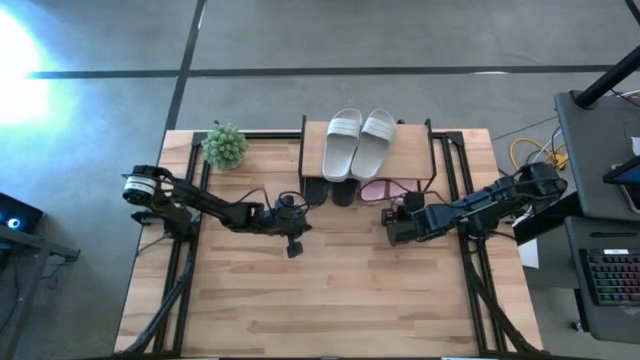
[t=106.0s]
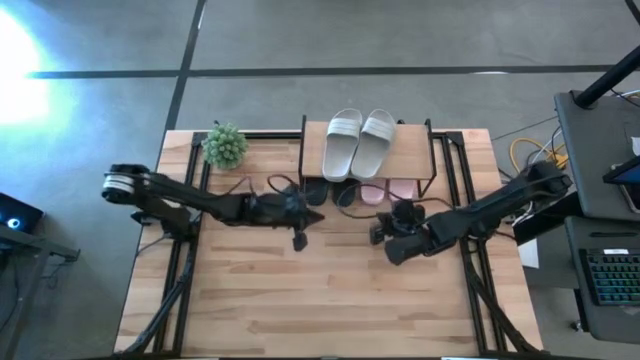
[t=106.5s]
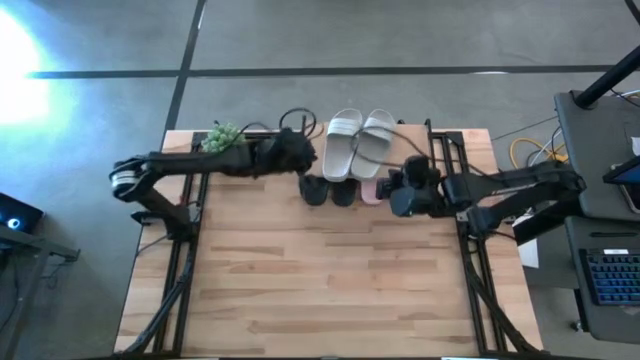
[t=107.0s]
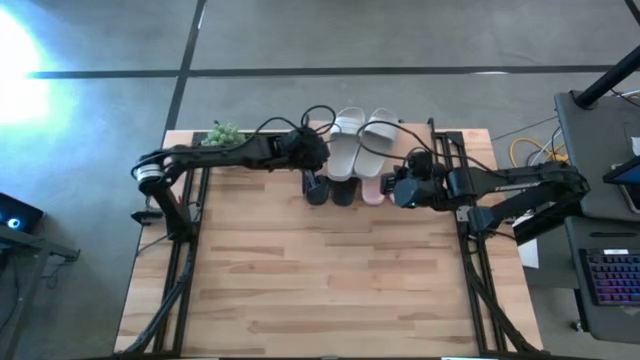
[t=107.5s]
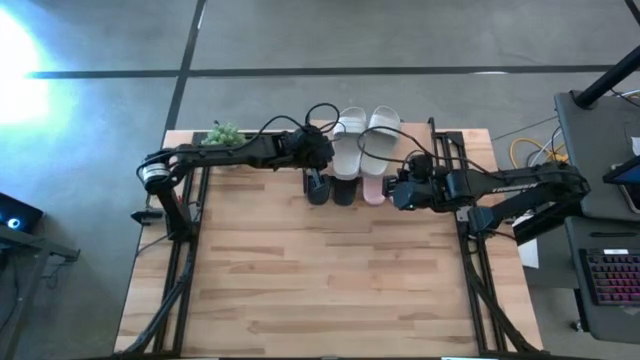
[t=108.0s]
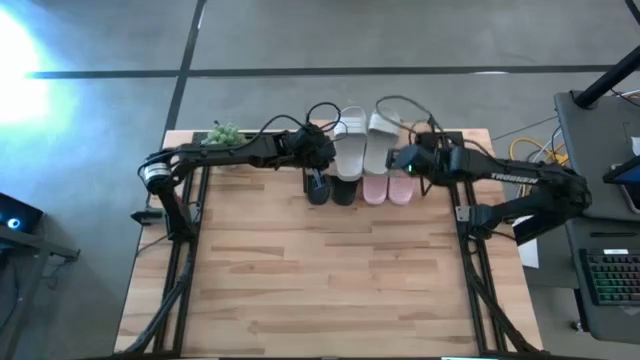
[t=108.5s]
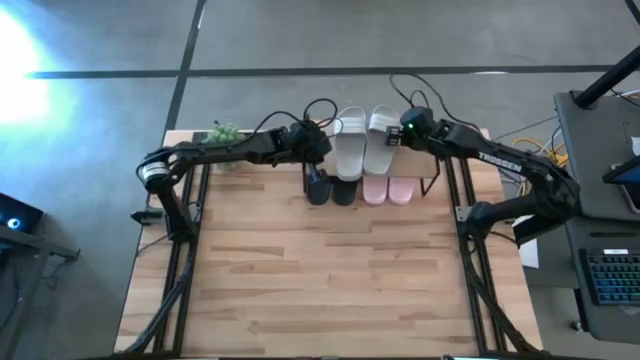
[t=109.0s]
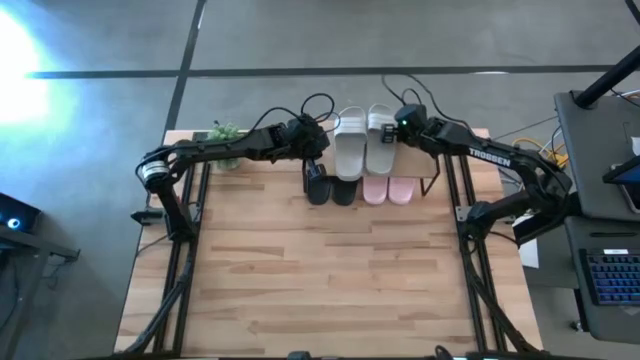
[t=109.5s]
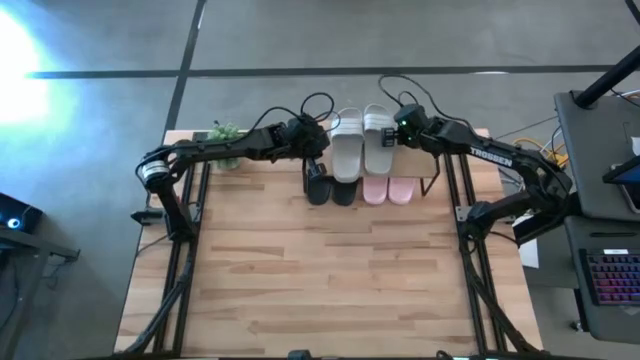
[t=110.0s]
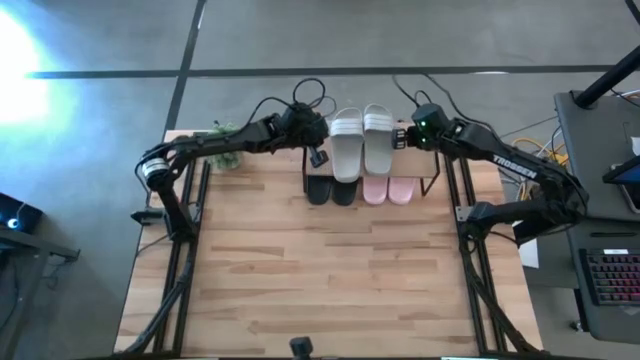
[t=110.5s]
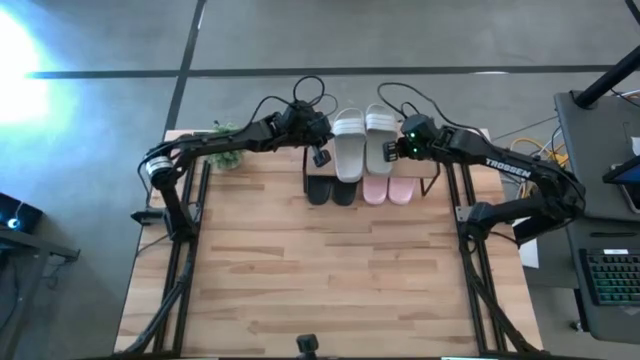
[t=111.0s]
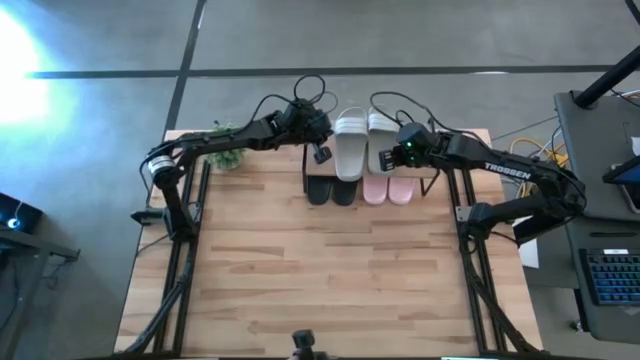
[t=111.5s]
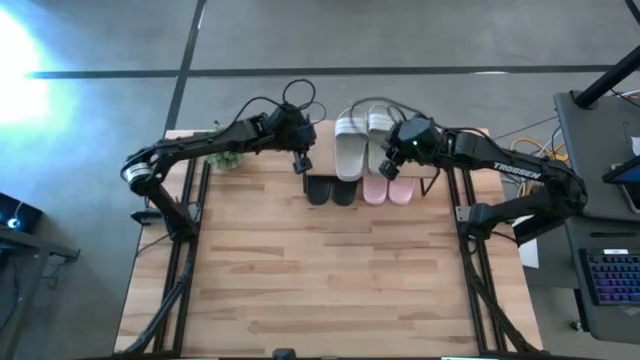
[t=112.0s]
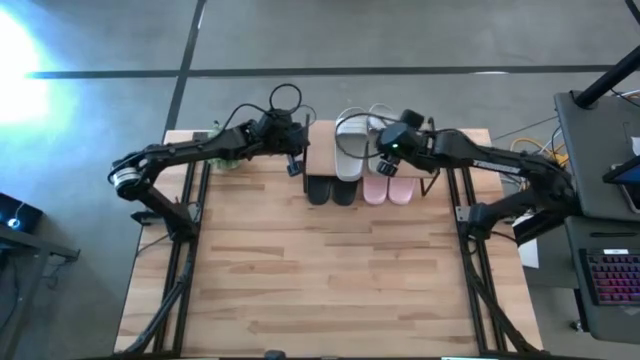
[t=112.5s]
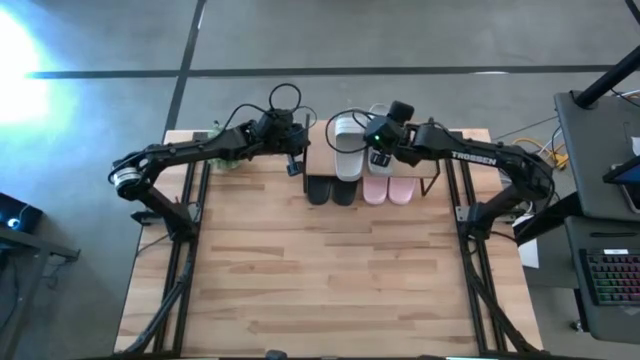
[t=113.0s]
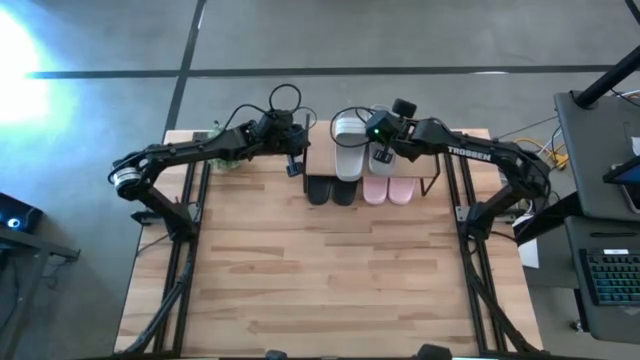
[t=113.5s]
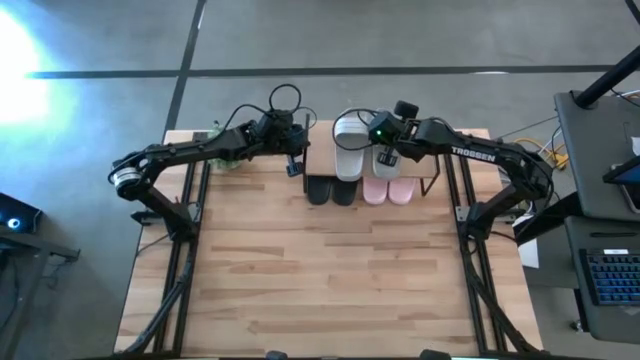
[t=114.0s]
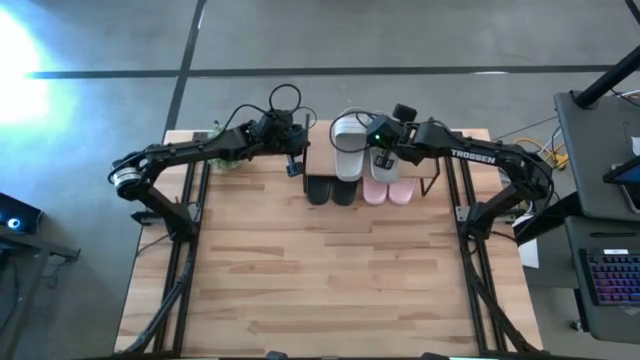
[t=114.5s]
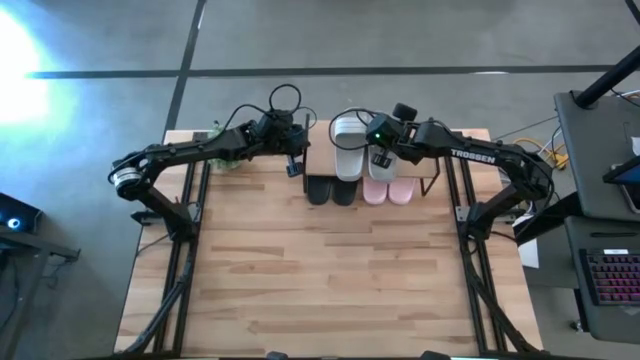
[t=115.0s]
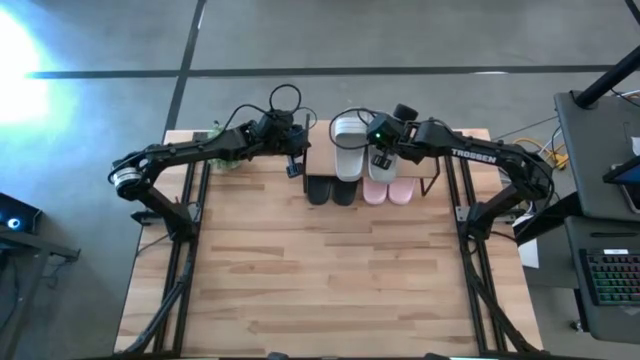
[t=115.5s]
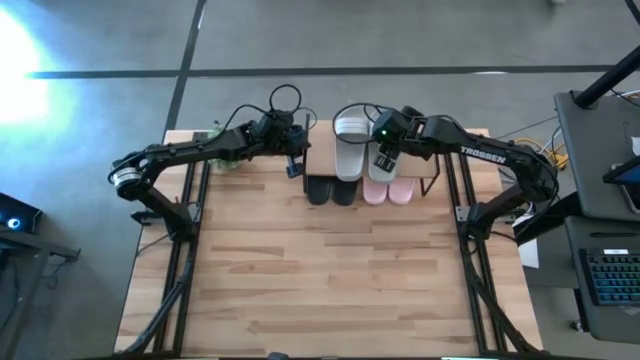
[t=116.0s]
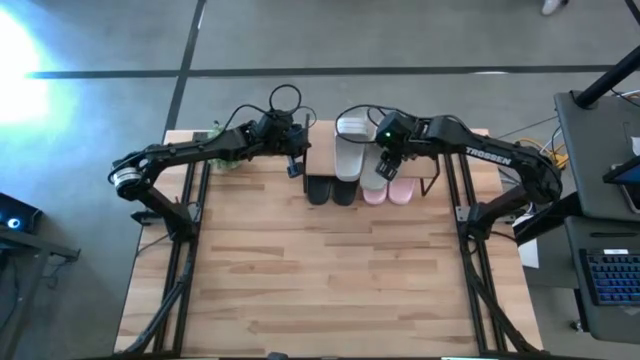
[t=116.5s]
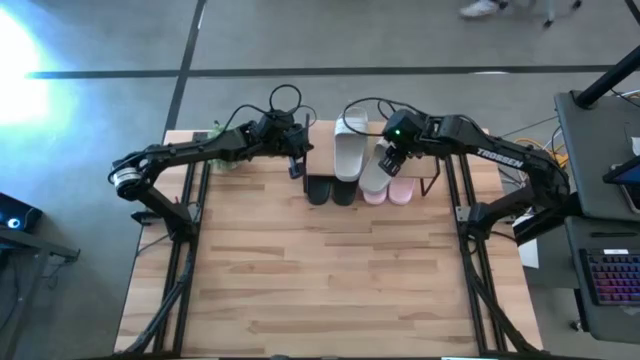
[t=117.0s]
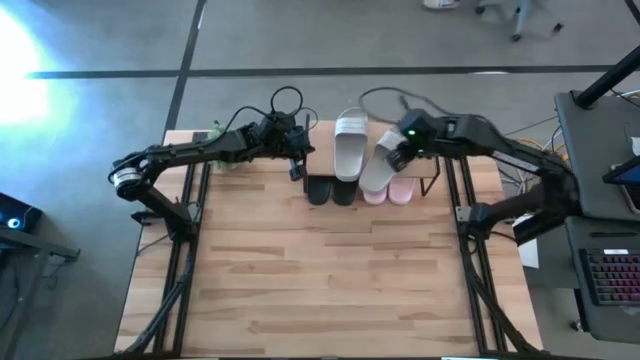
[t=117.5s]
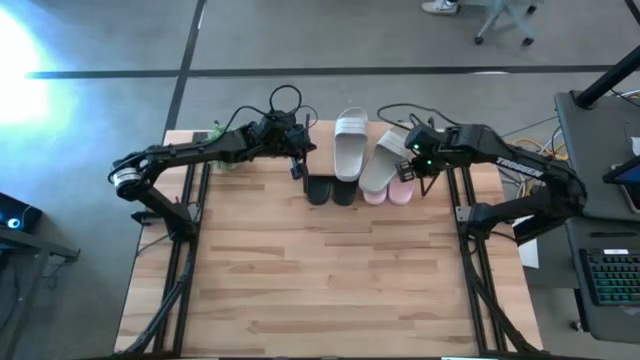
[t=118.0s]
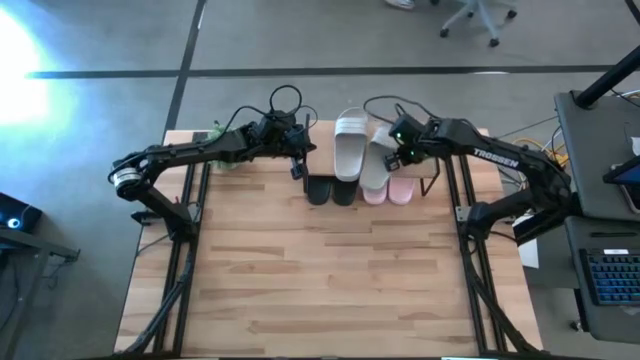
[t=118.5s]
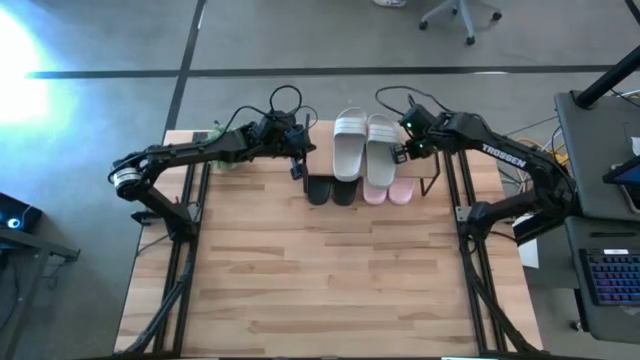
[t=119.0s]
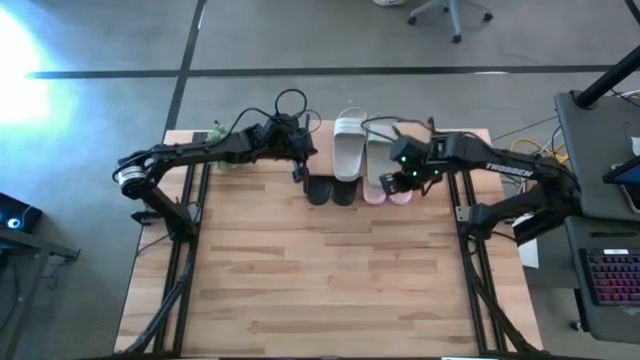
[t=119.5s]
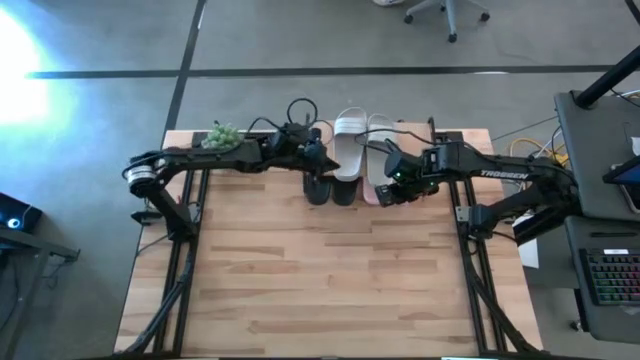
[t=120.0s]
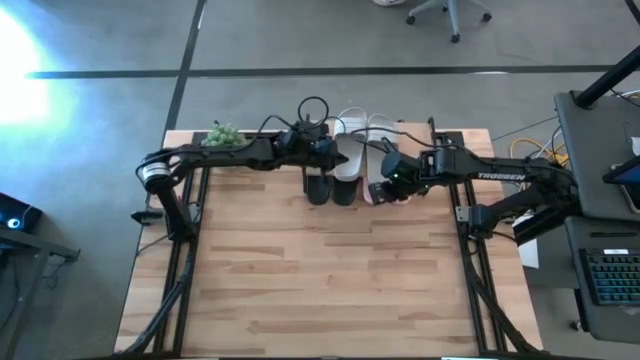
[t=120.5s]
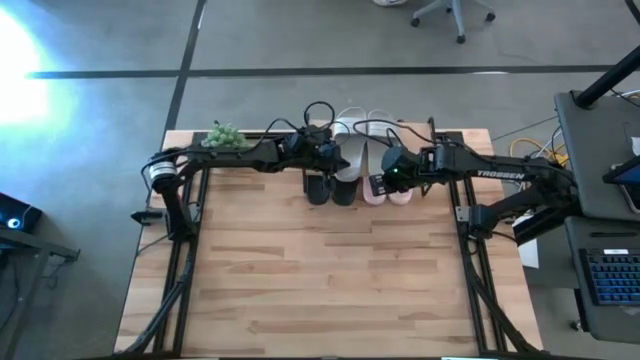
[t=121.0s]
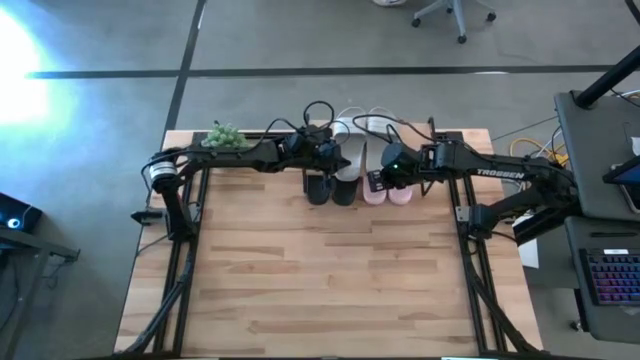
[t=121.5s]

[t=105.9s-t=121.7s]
Task: Pick and place slides into the shelf
Adjust the gray slippers on the shelf

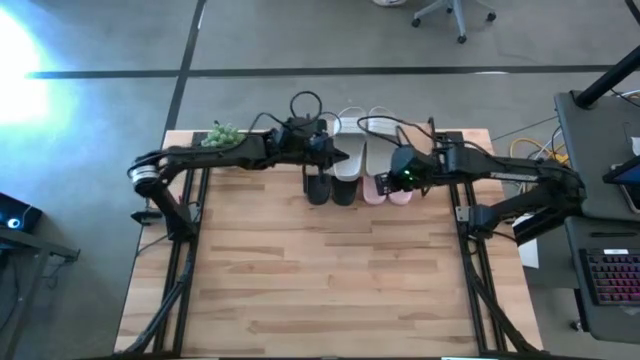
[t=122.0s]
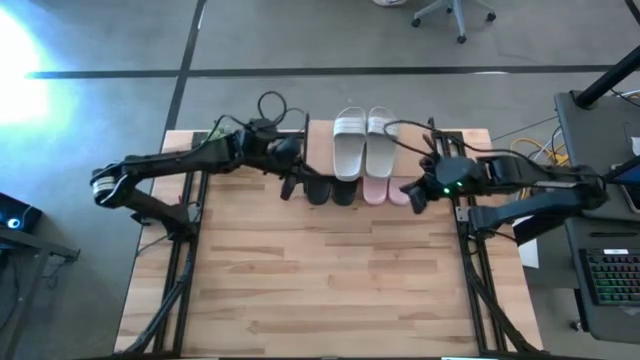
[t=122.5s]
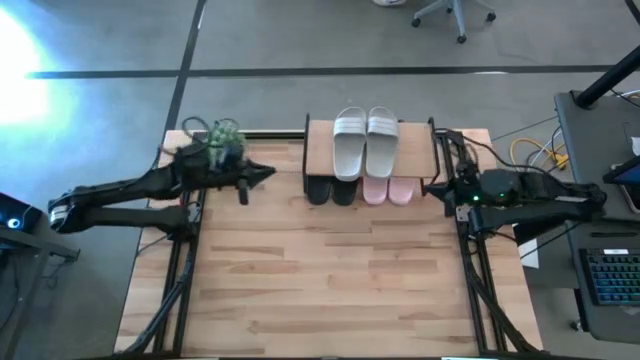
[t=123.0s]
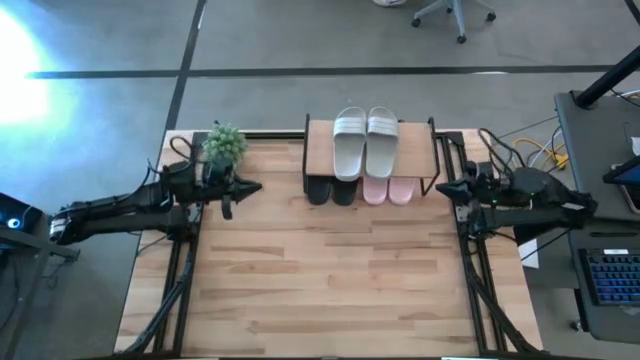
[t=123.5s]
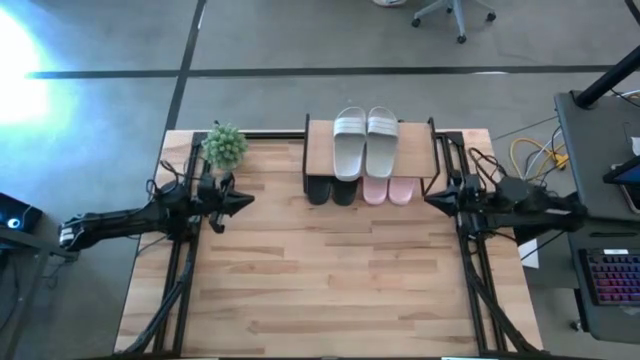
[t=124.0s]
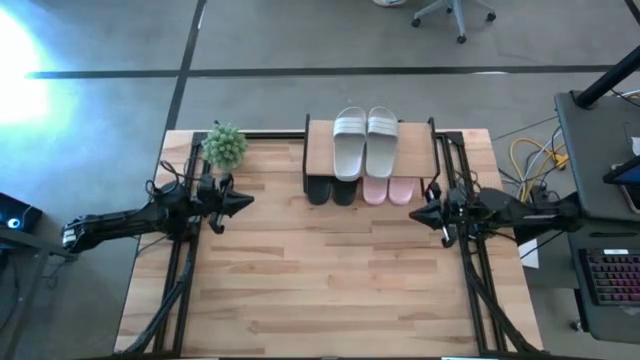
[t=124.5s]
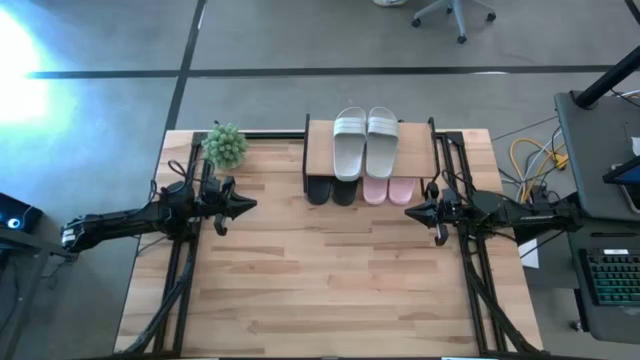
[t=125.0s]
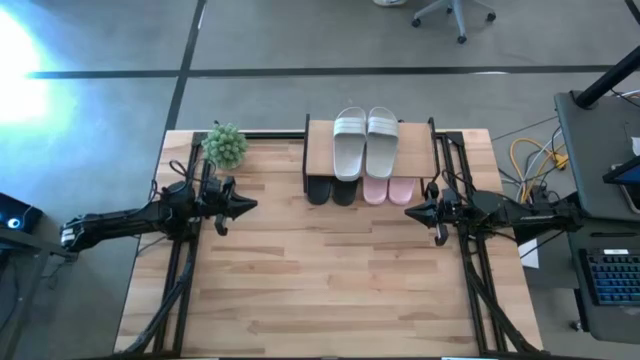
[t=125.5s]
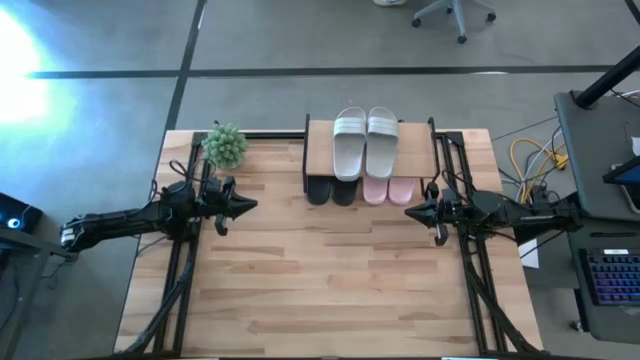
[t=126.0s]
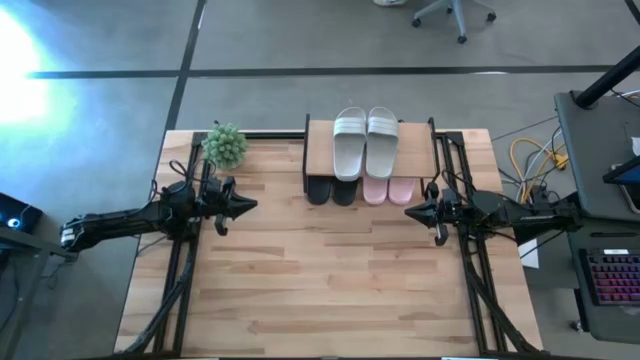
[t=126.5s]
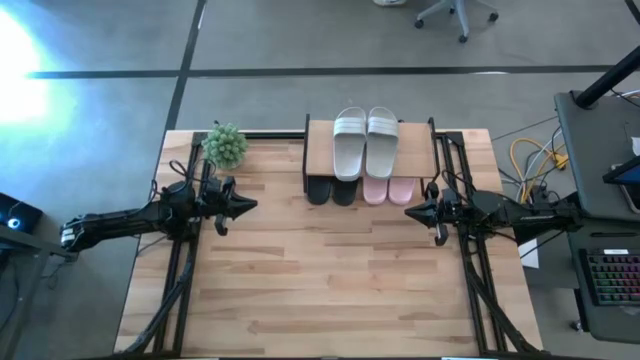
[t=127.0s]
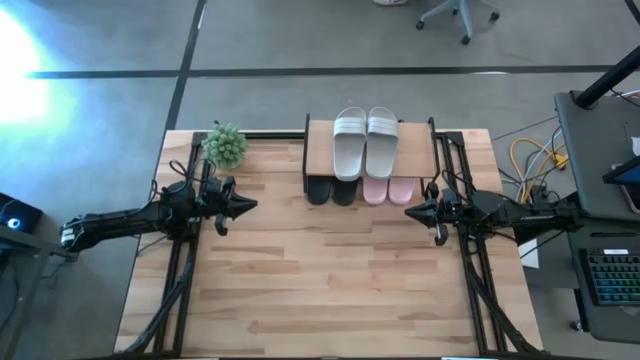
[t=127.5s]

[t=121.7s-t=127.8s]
Return to Home Position
